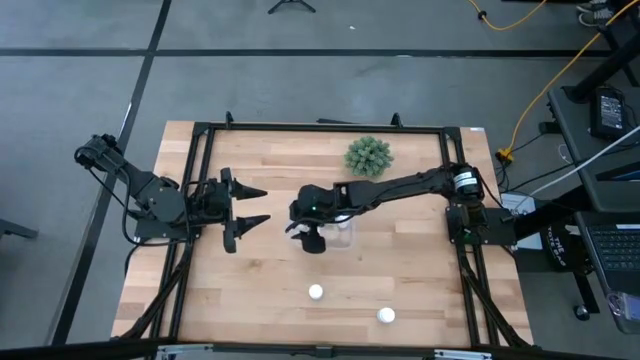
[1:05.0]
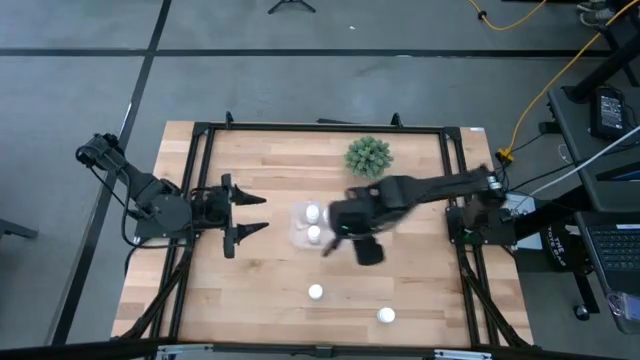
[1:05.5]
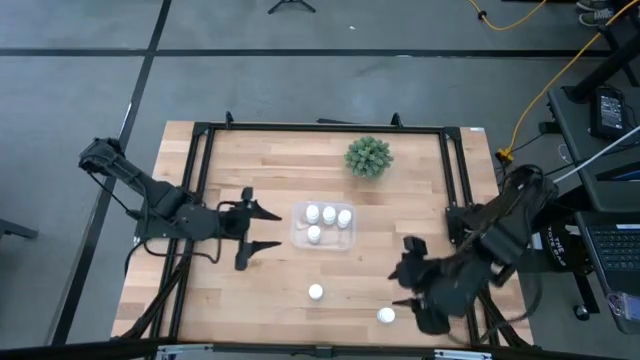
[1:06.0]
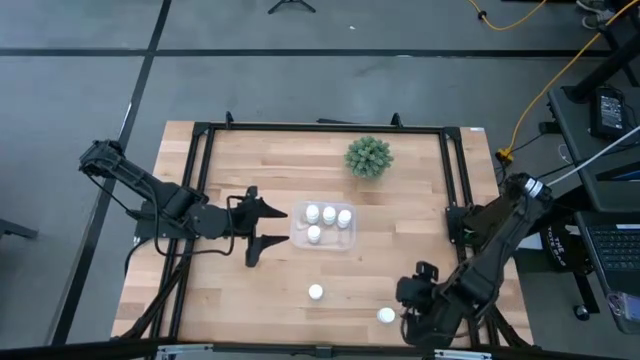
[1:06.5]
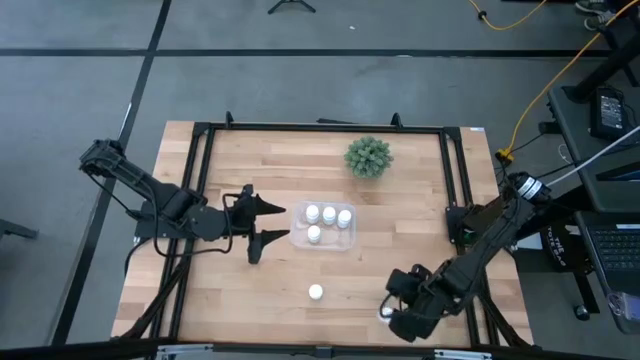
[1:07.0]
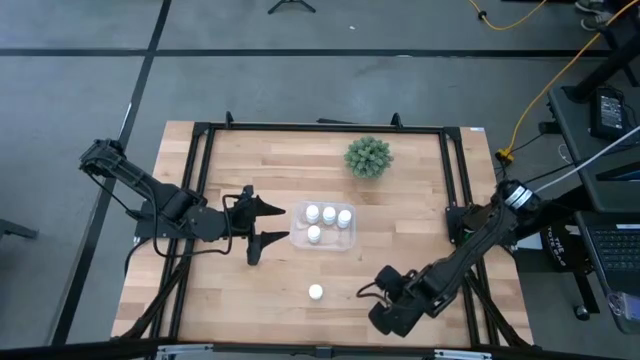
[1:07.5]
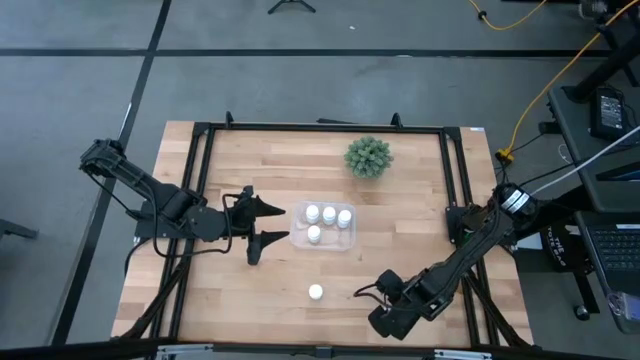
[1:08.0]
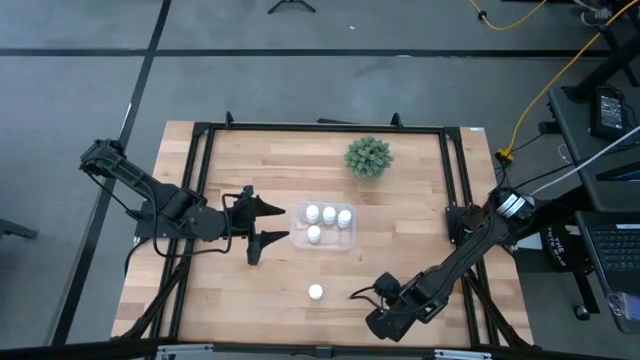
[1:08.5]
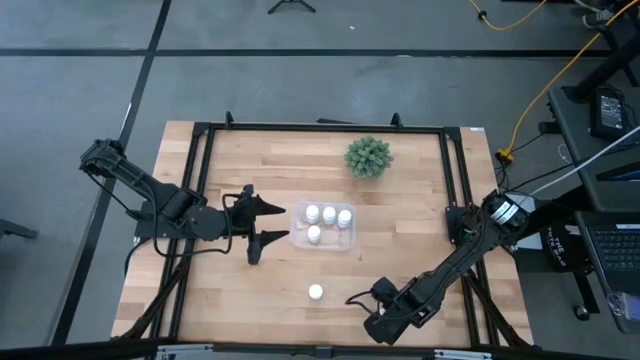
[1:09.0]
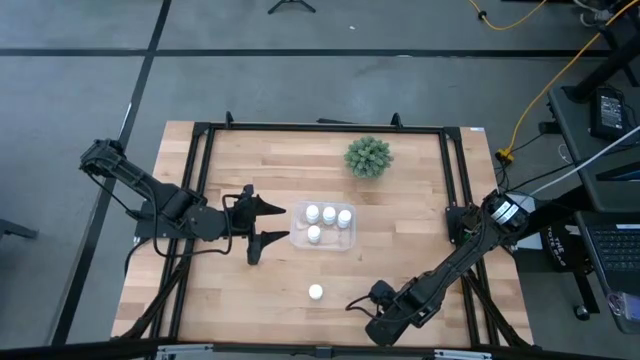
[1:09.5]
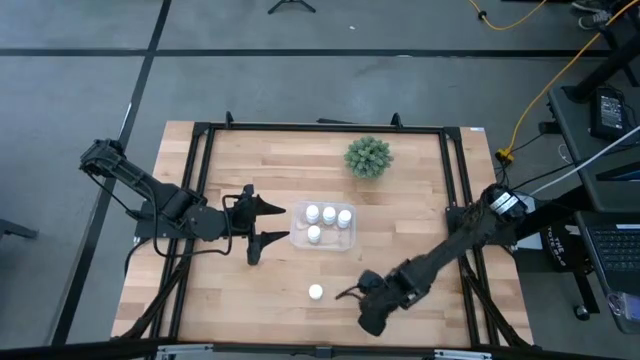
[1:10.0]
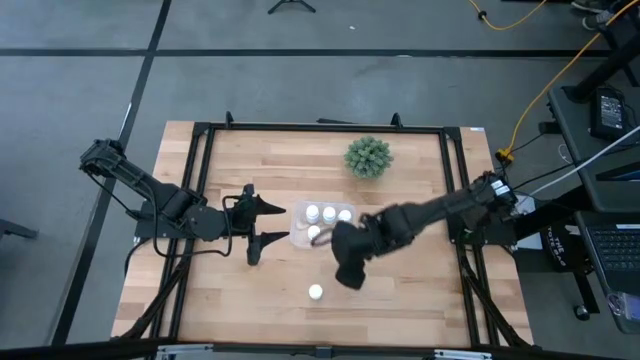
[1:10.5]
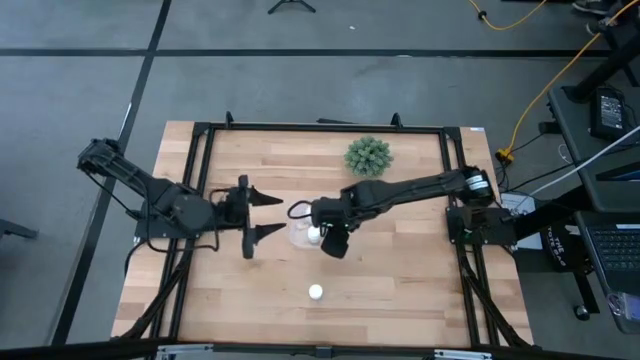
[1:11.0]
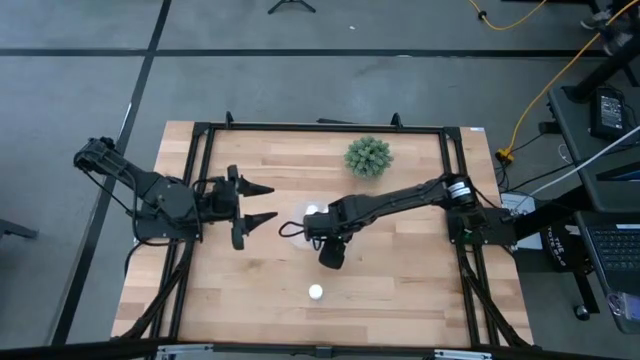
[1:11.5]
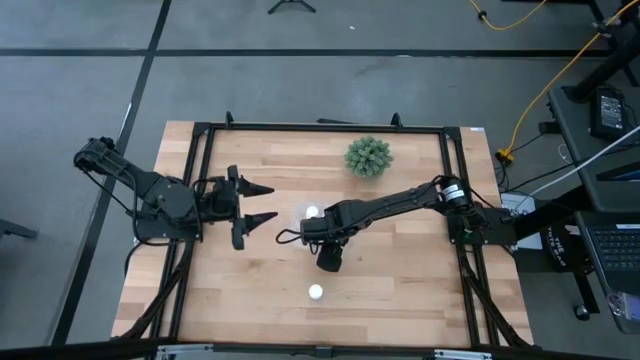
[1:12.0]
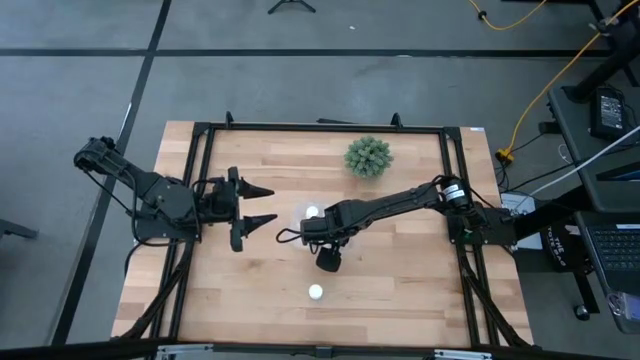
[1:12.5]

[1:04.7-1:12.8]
Task: Pick and place pill bottles into a basket
Put the white pill bottle into the transparent bin

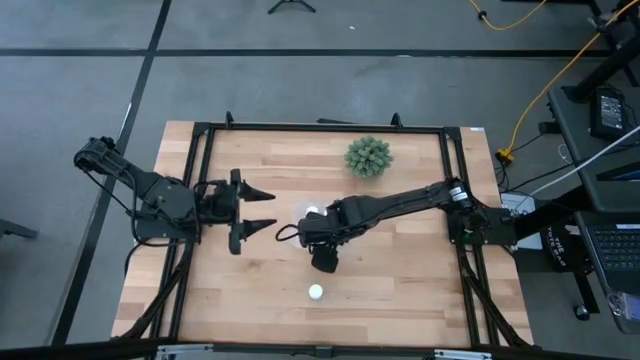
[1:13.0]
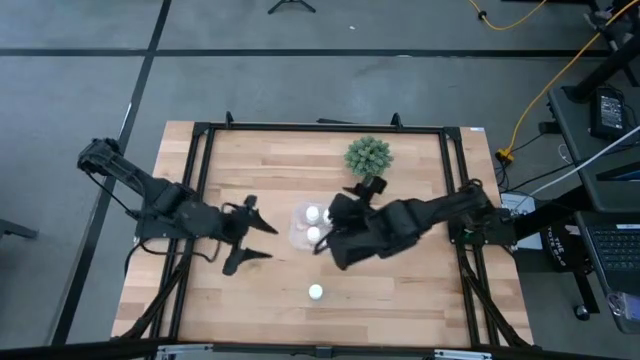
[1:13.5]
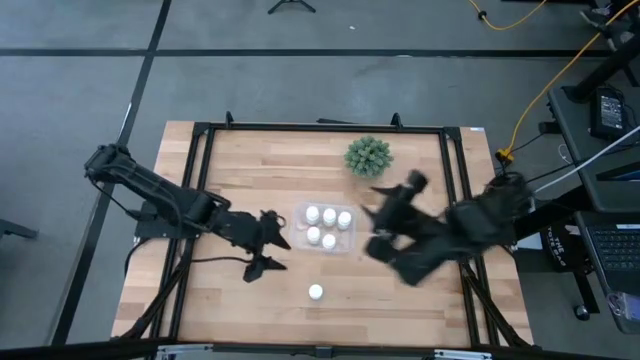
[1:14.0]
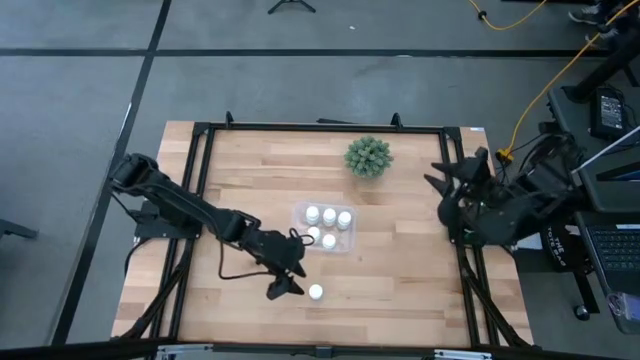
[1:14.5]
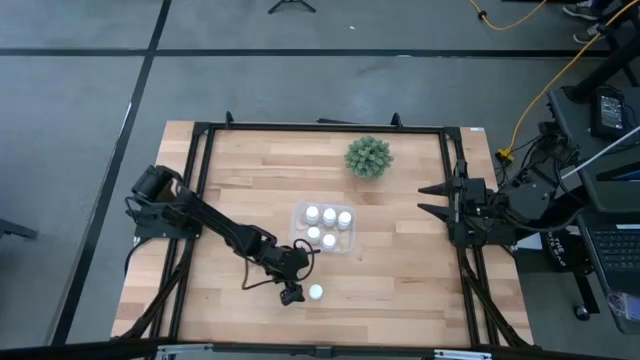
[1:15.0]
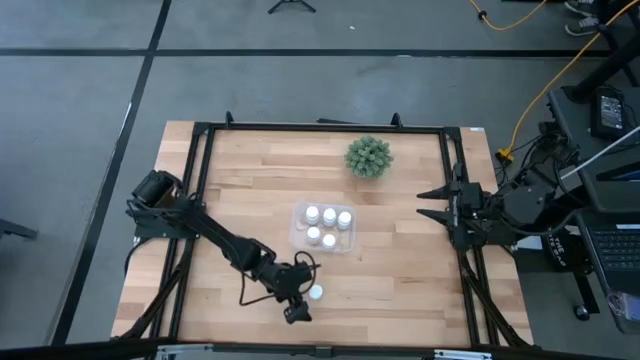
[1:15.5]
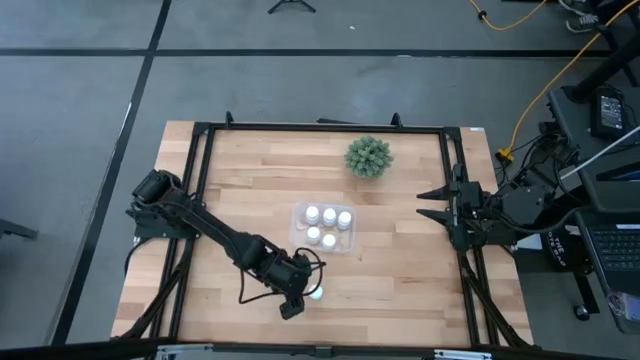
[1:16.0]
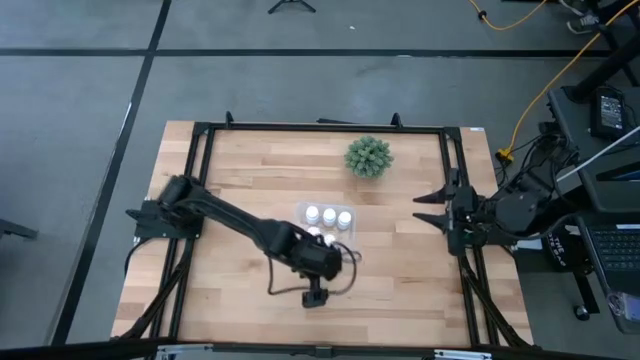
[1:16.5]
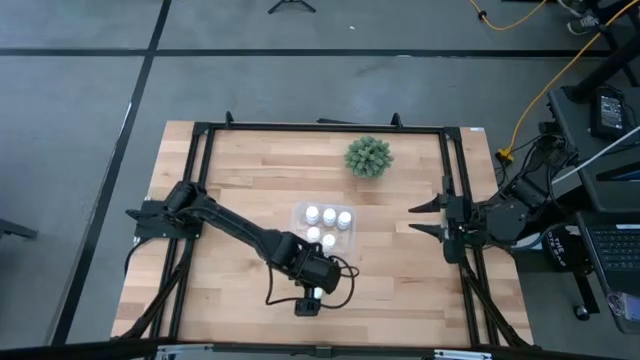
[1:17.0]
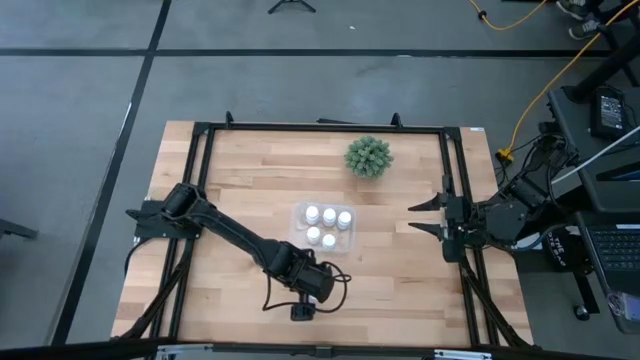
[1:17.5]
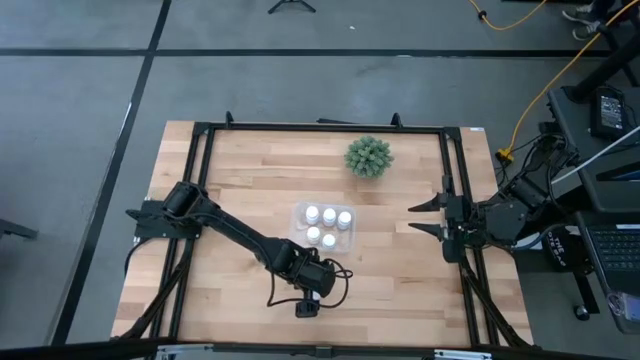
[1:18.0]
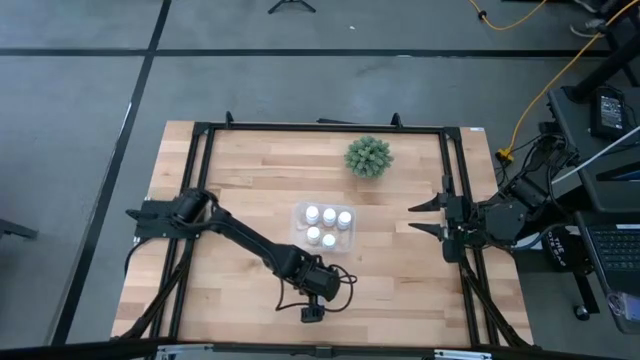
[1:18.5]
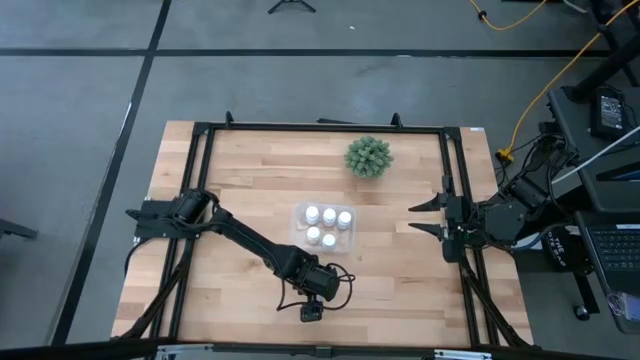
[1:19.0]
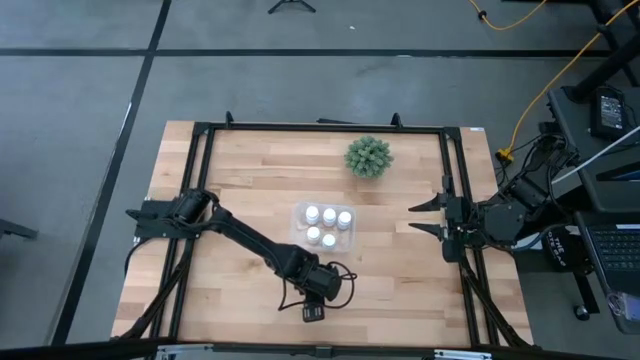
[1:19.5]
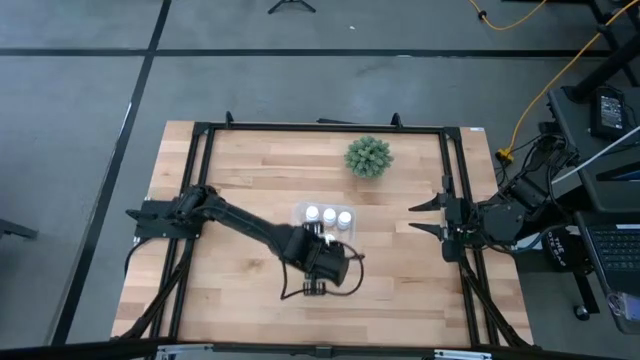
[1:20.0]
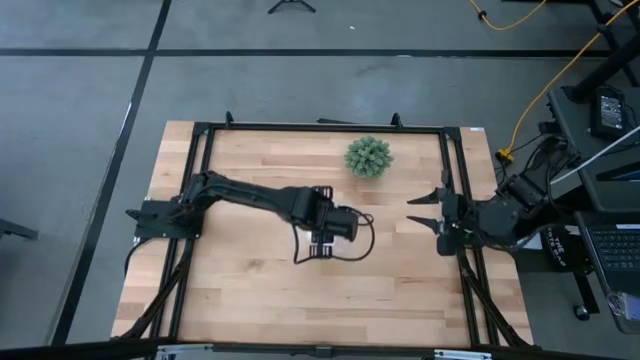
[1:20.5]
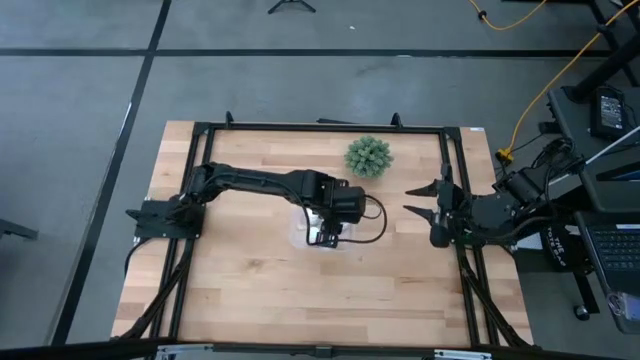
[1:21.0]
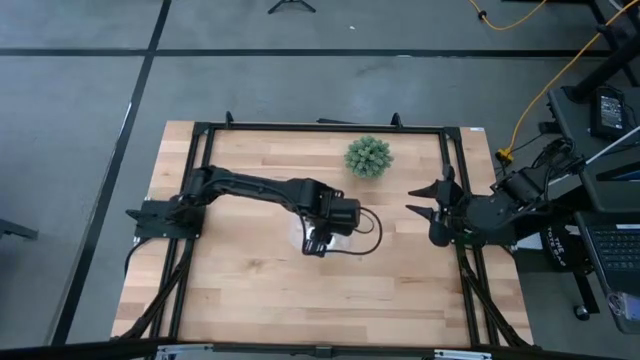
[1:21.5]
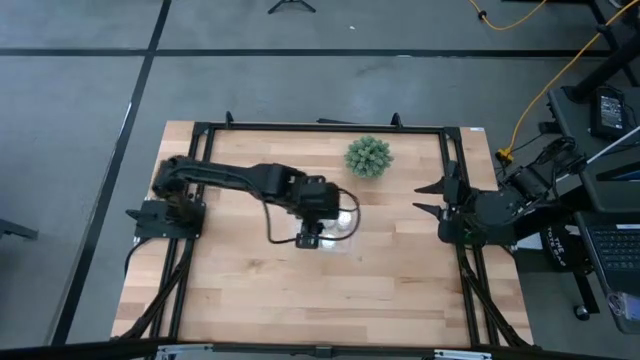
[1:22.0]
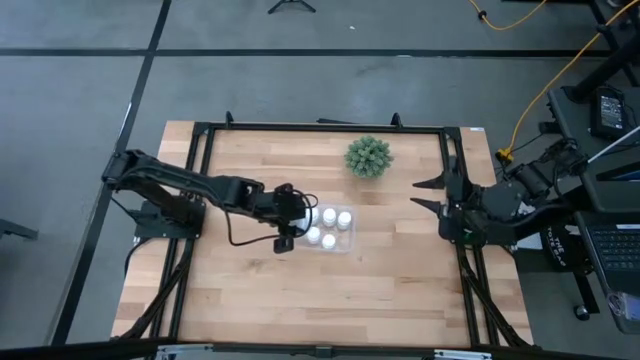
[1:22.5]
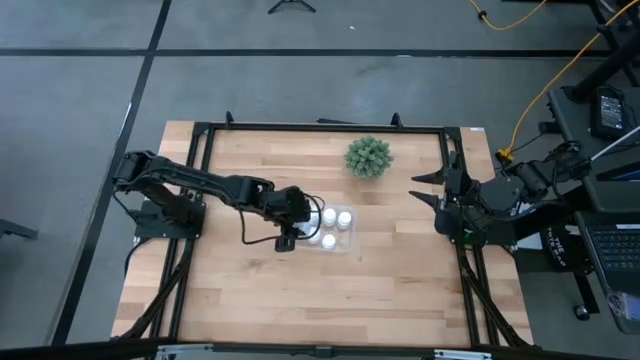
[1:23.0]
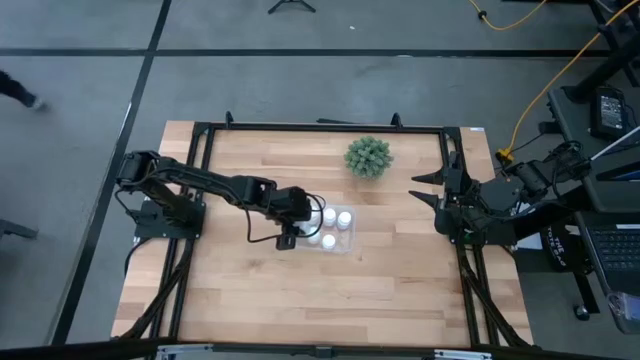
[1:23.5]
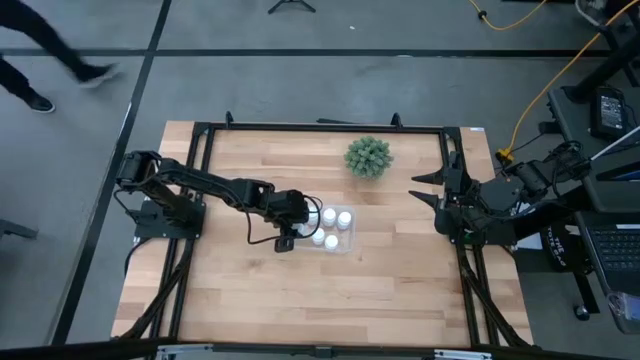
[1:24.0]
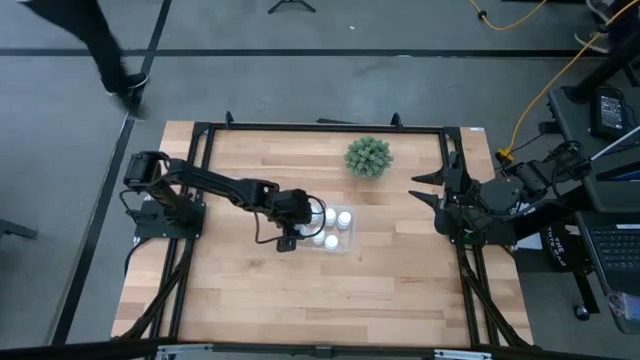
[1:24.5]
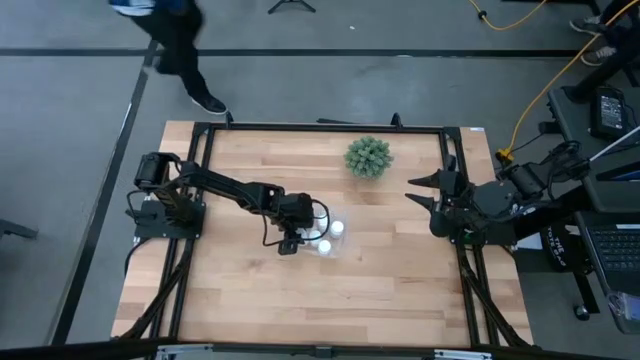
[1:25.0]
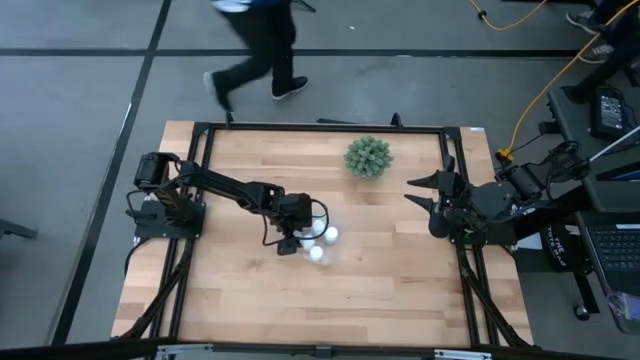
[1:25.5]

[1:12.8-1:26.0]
Put the white pill bottle into the transparent bin

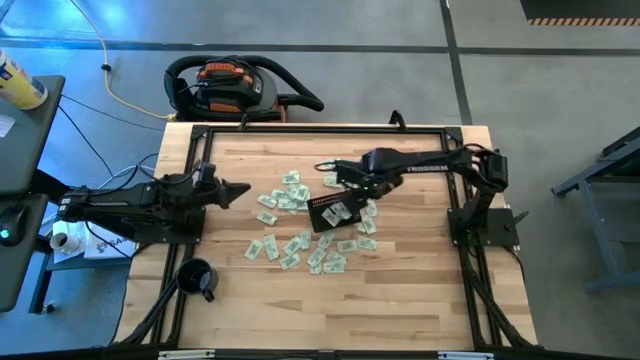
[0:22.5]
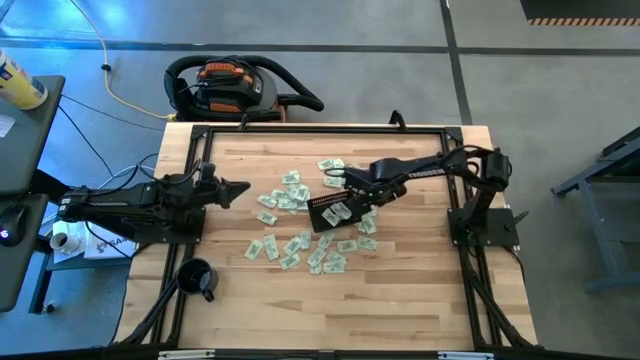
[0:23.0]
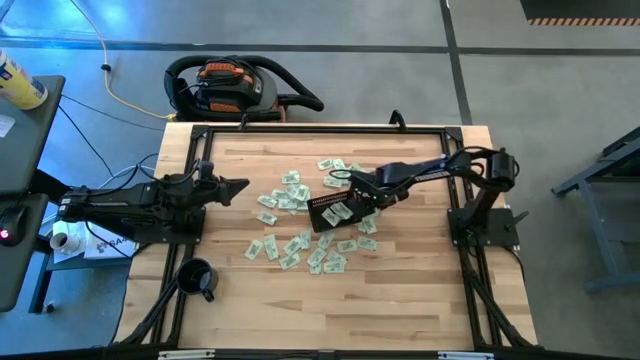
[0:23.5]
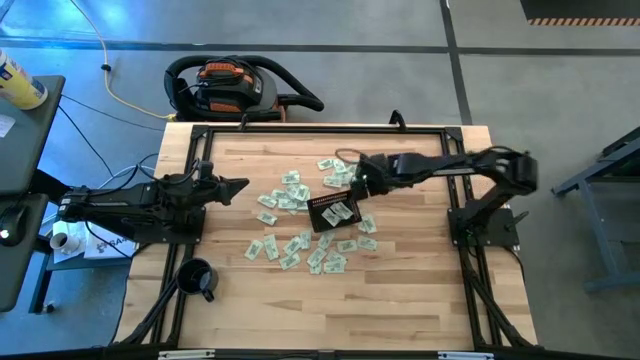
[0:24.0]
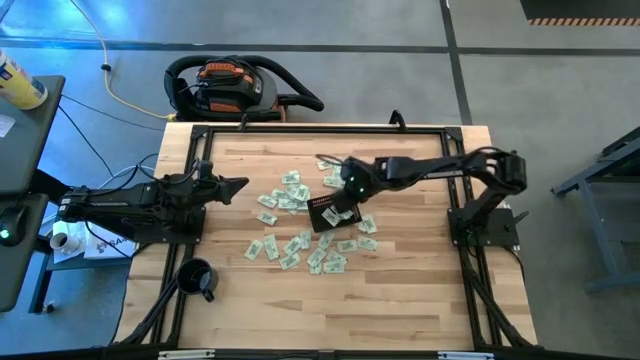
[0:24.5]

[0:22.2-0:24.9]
Task: Pick and place Stevia / Truvia into bins
Put the green stevia packet into the black bin
